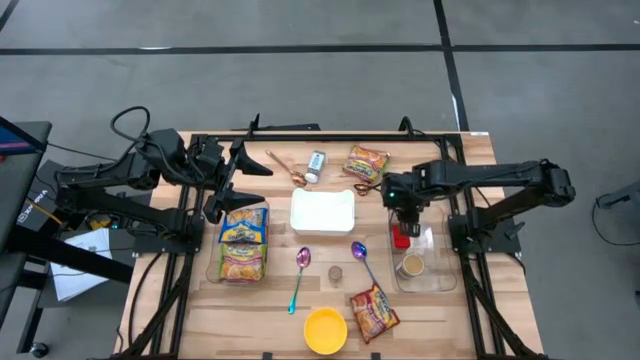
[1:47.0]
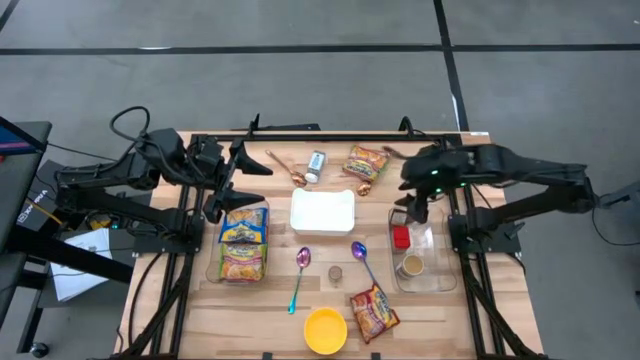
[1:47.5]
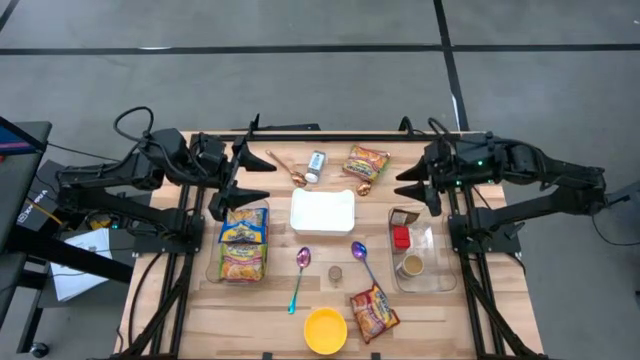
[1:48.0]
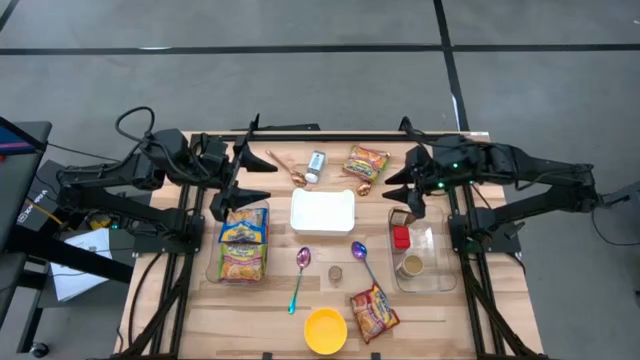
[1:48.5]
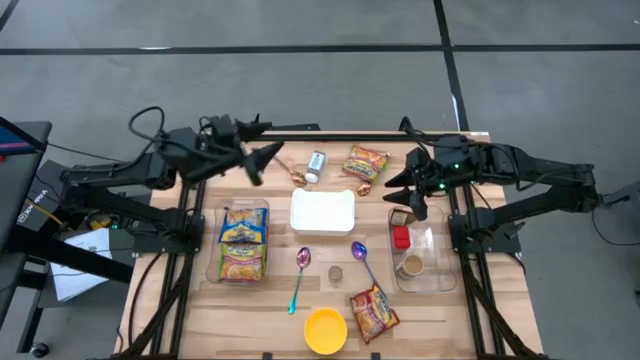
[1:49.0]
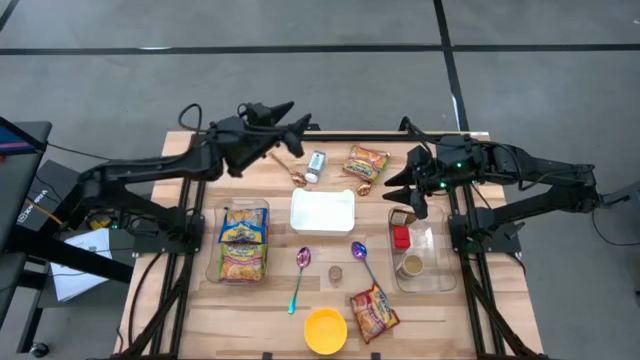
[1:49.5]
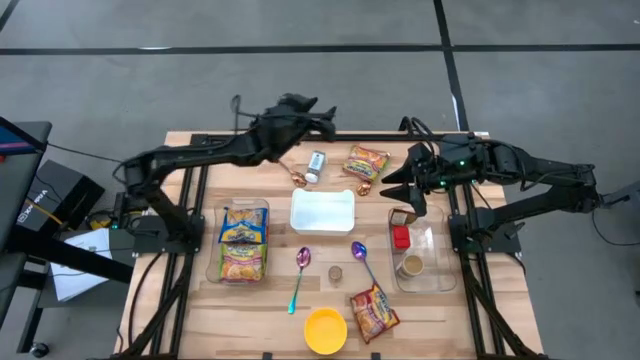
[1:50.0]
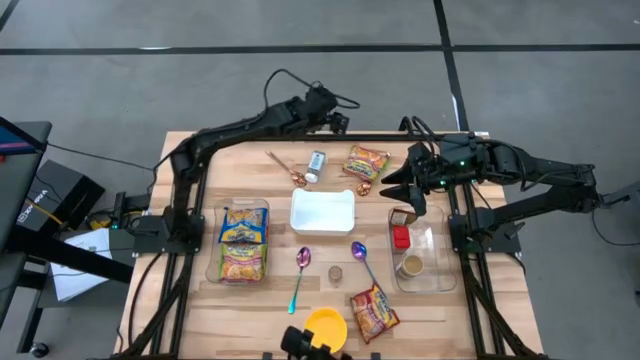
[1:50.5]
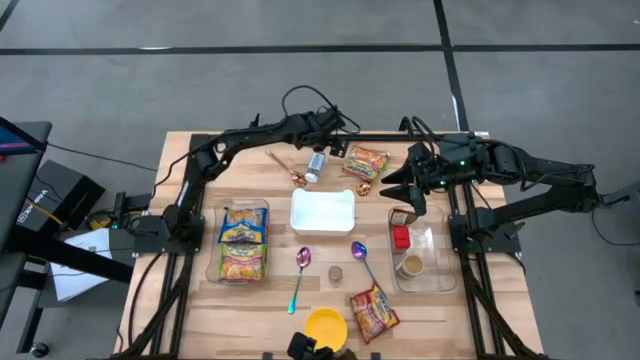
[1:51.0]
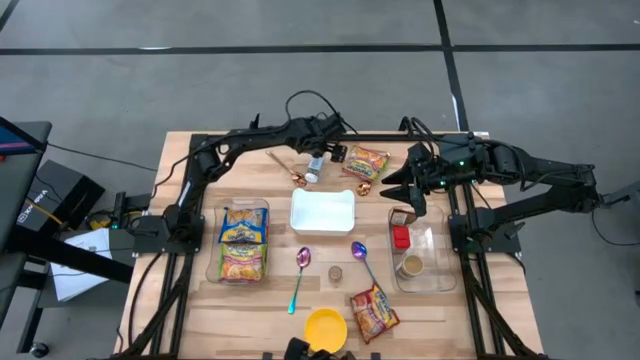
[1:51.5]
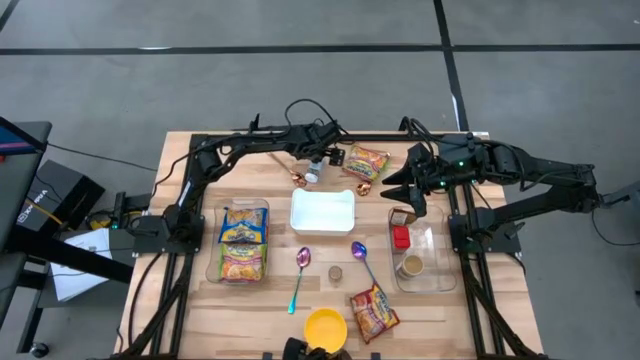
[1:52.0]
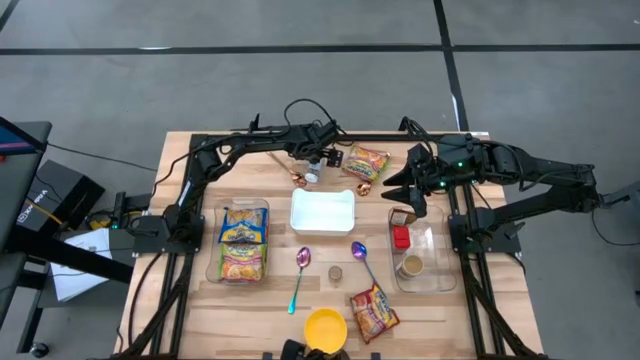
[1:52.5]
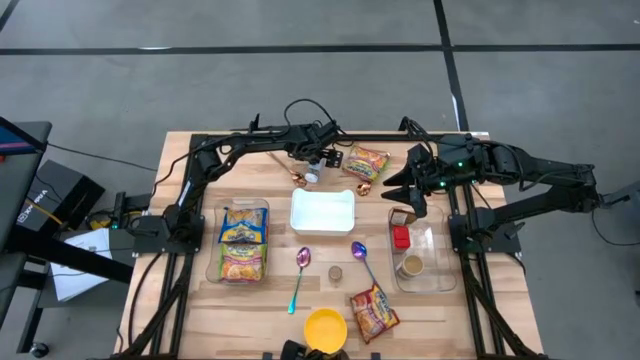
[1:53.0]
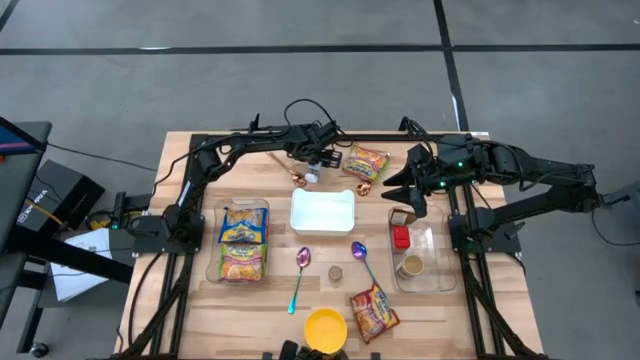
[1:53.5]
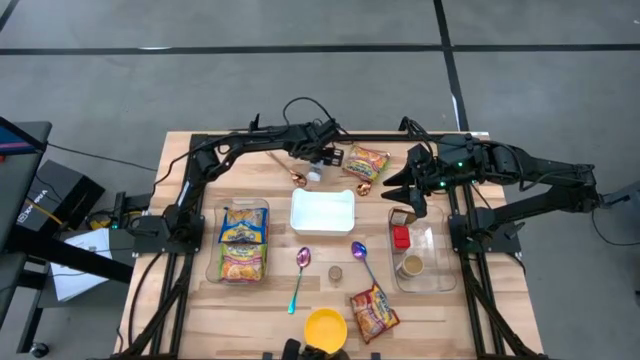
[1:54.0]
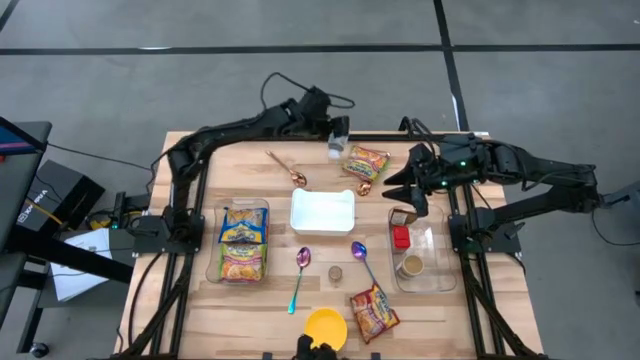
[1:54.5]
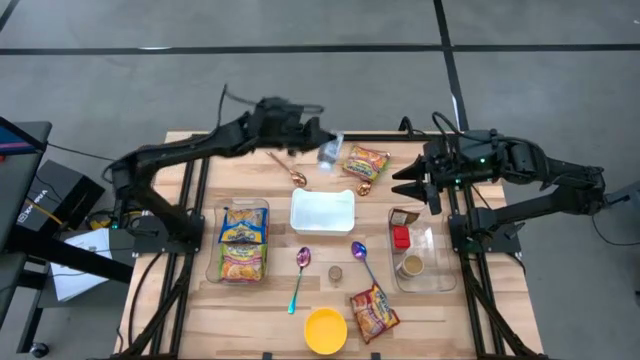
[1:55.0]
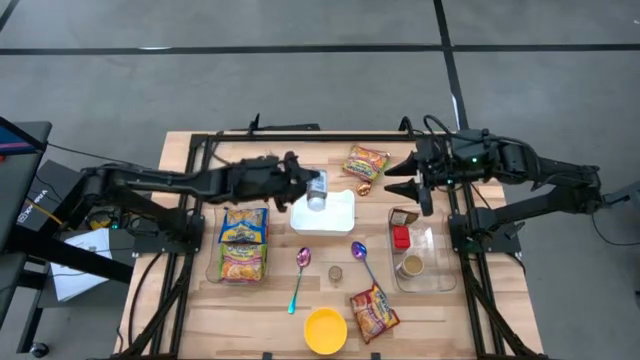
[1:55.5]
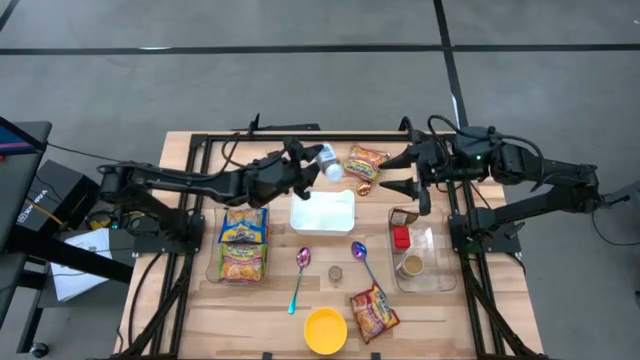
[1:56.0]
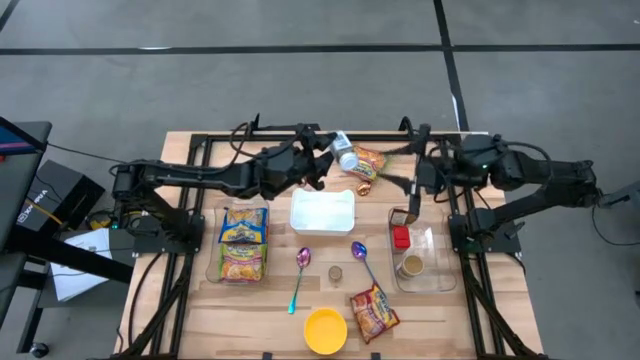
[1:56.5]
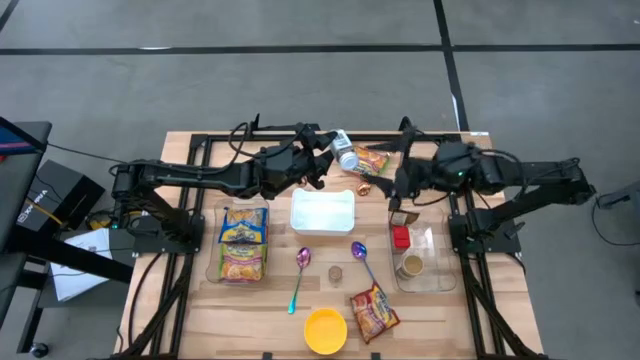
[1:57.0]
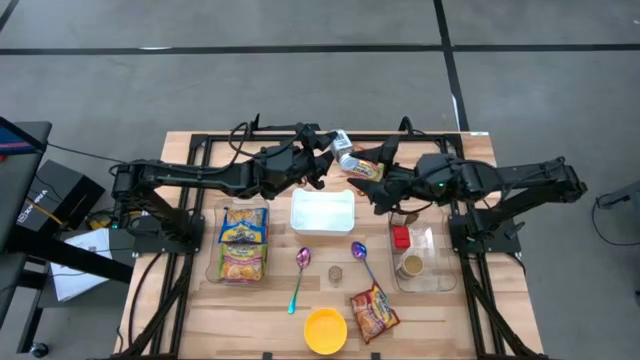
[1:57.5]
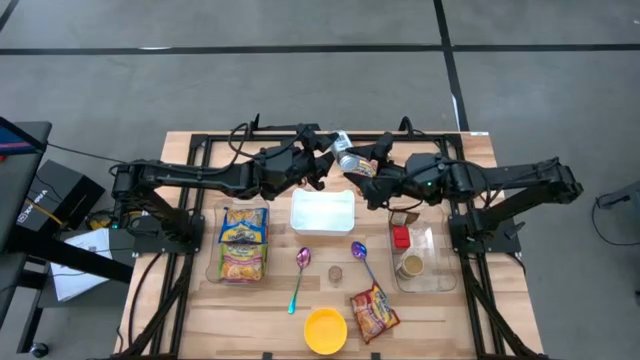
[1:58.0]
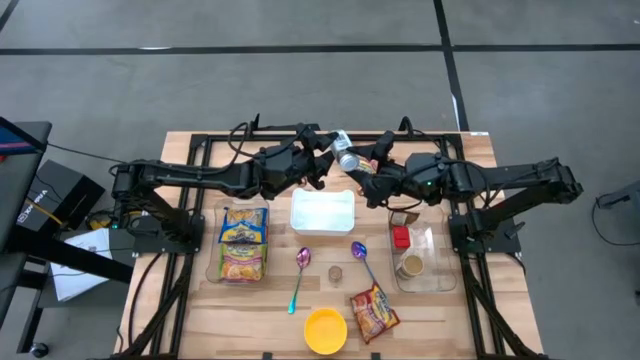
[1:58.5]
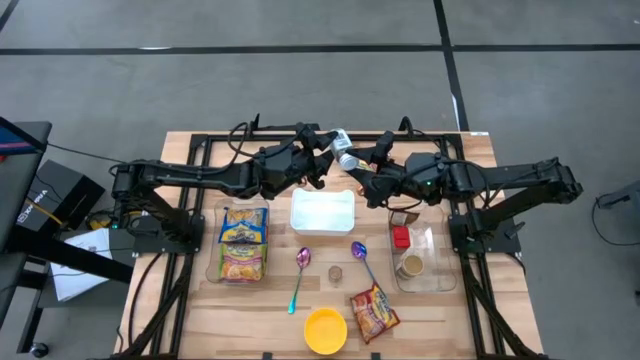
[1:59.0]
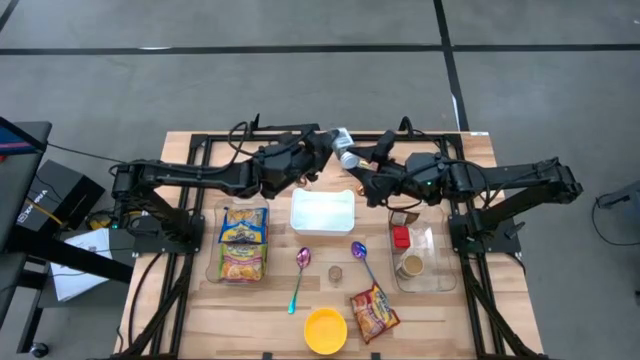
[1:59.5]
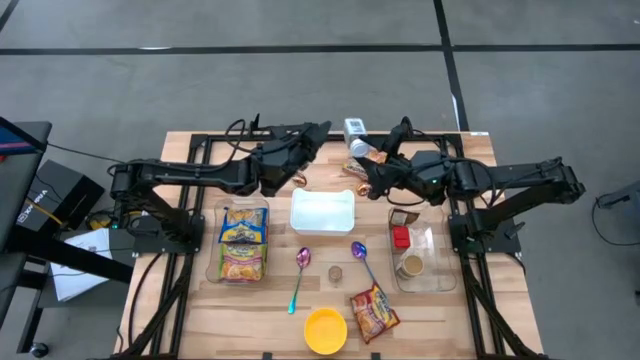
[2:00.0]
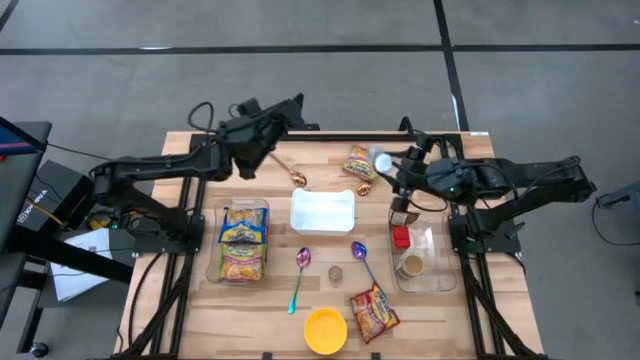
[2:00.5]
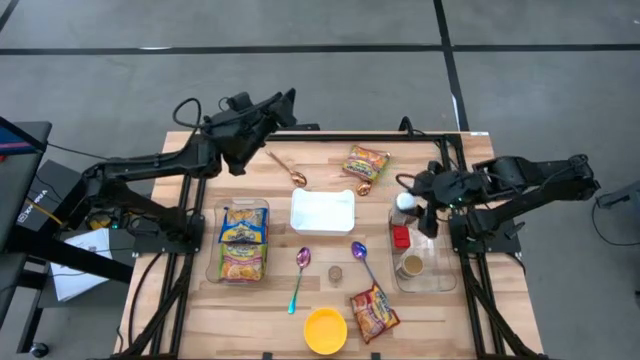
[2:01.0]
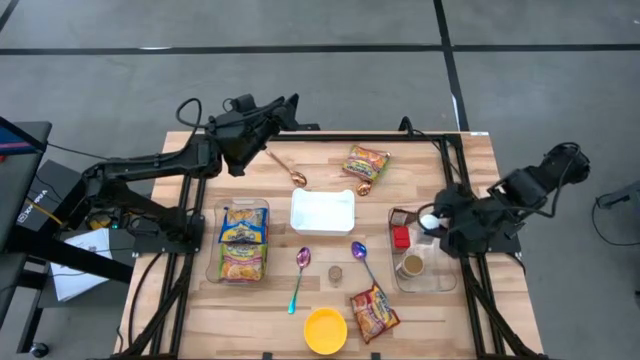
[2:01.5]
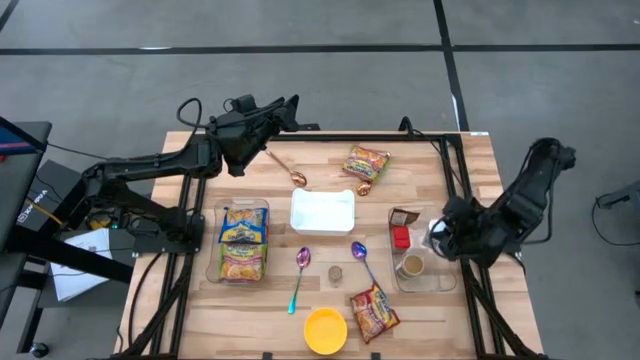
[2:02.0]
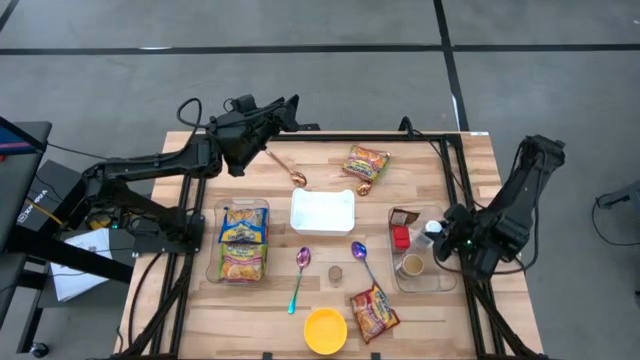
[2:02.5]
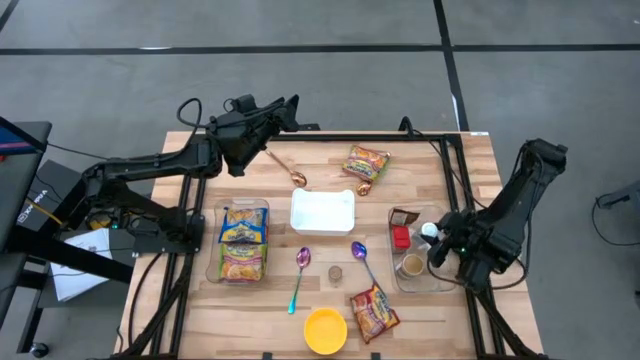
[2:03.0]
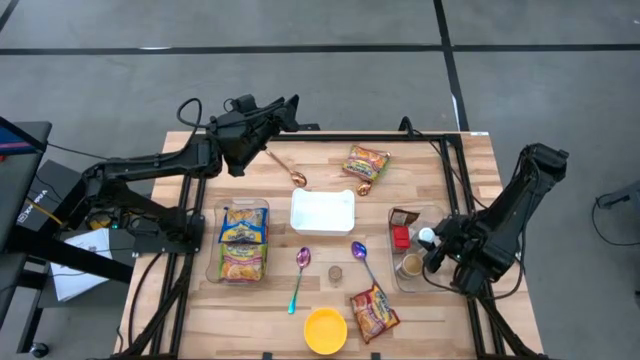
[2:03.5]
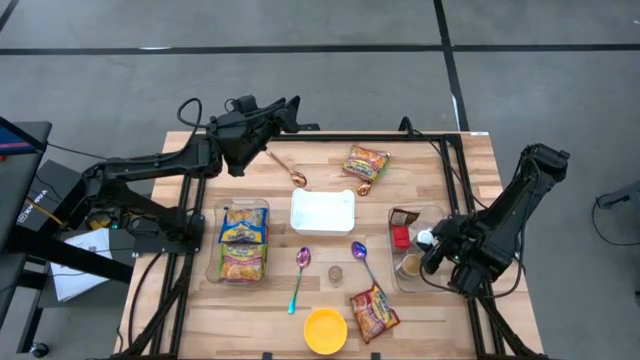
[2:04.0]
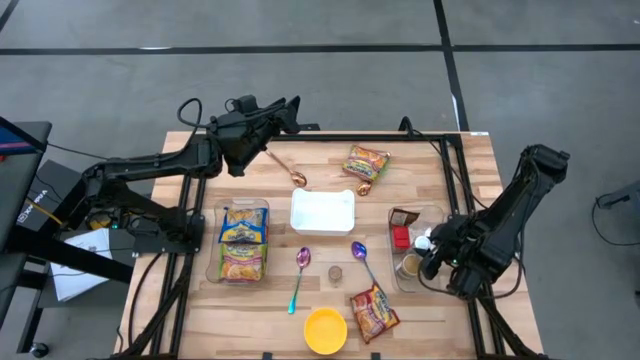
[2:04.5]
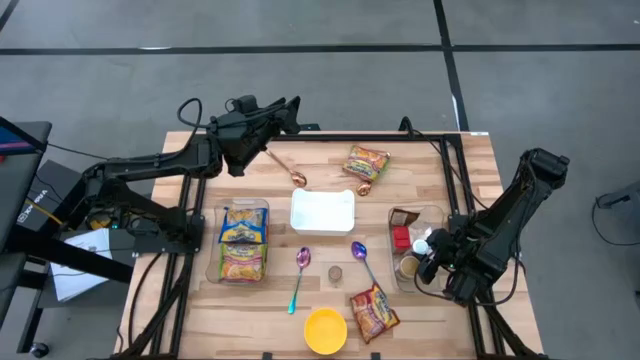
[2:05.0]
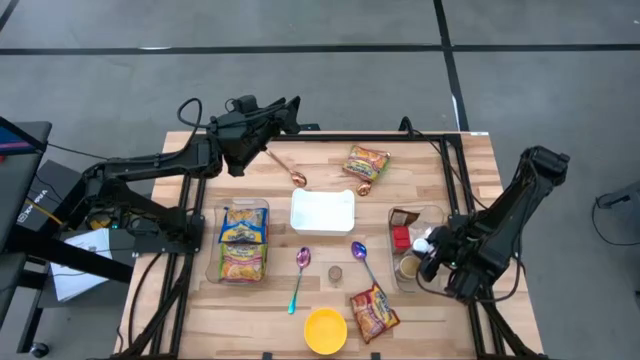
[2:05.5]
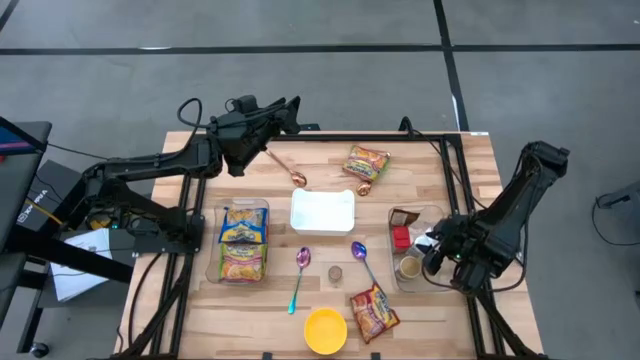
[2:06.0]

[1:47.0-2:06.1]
Task: Pick & Place Food Item
Put the white seasoning bottle into the right transparent bin

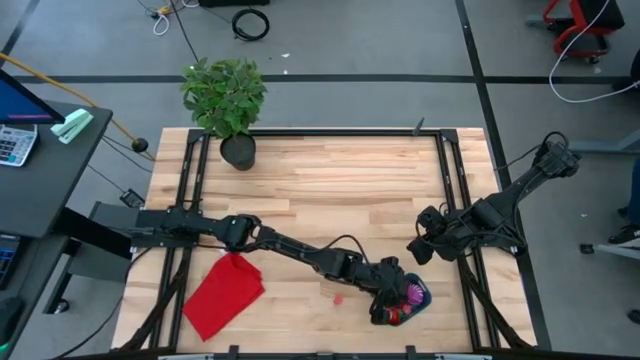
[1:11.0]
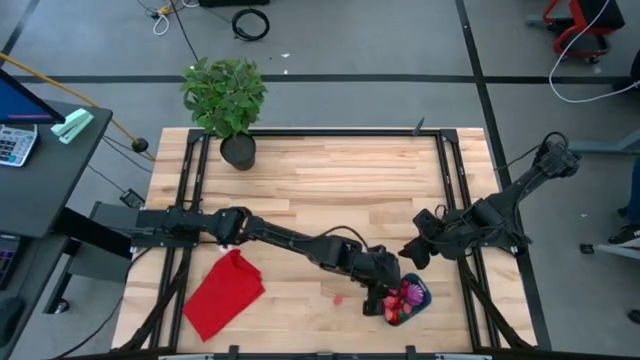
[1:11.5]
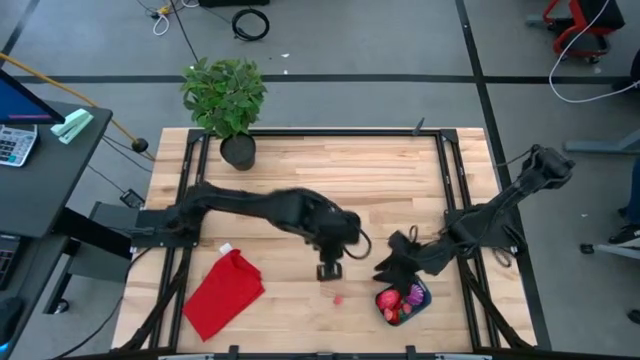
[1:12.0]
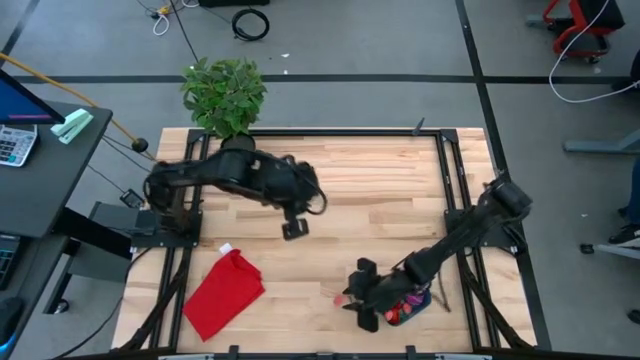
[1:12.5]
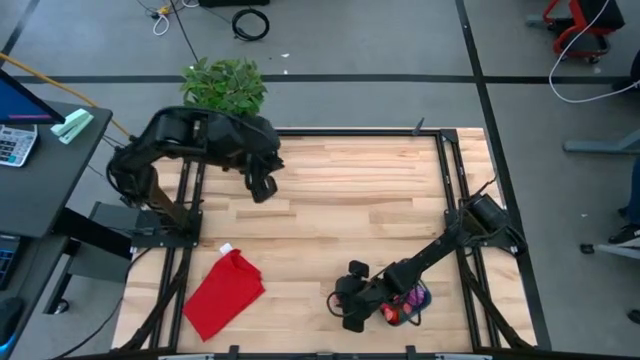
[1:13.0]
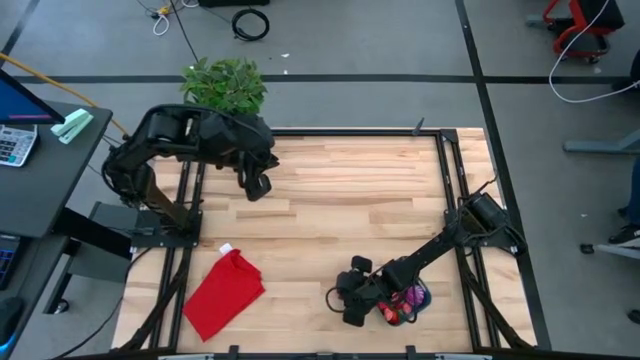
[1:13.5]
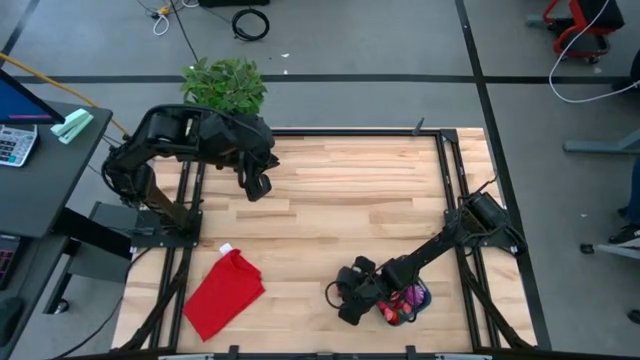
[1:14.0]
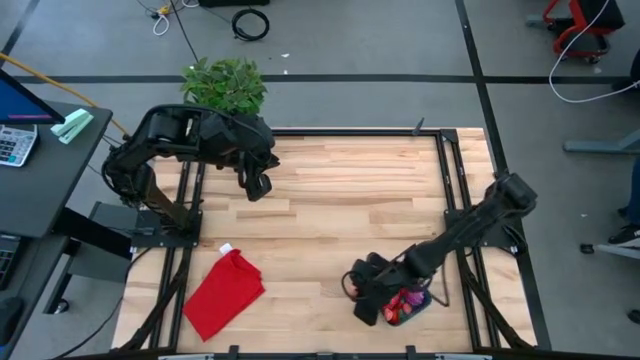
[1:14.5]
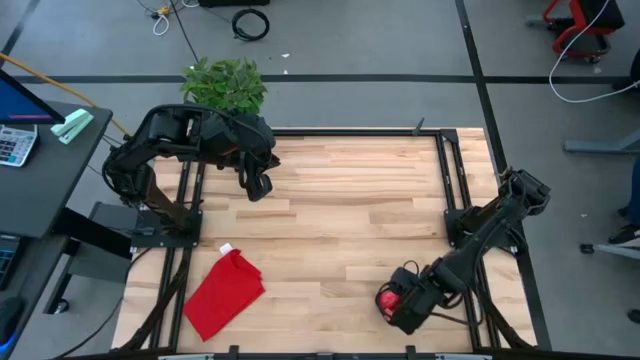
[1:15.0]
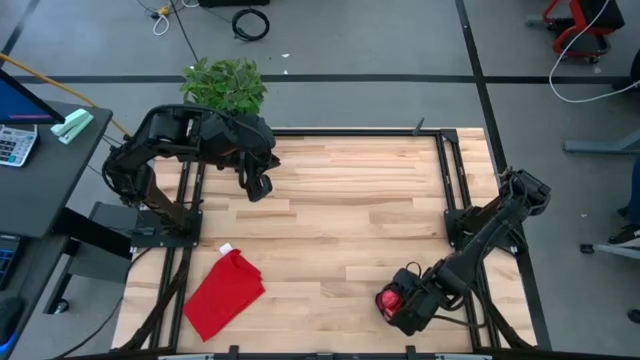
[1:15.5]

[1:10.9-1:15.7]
Task: Pick and placing Produce into tupperware
Put the peach into the bin
